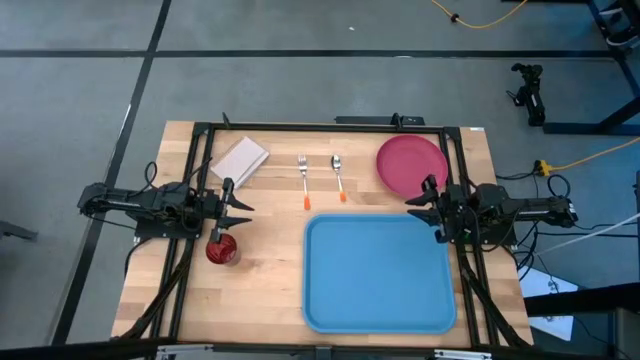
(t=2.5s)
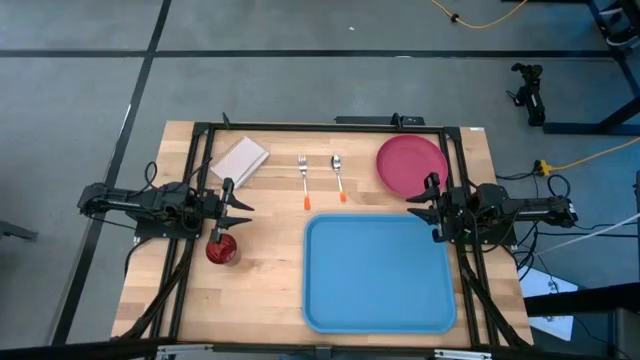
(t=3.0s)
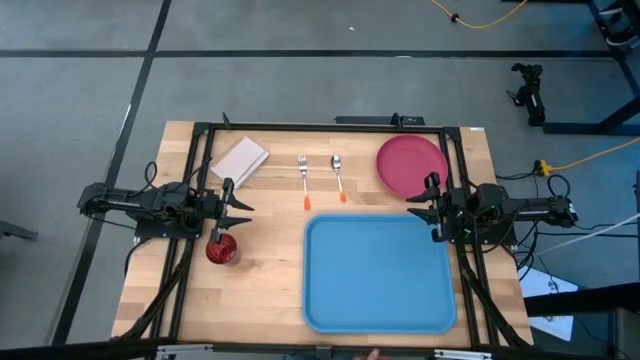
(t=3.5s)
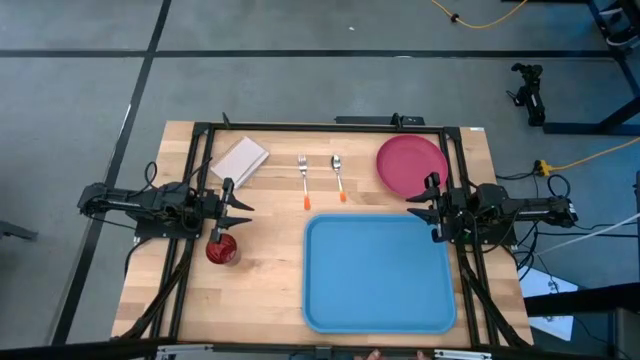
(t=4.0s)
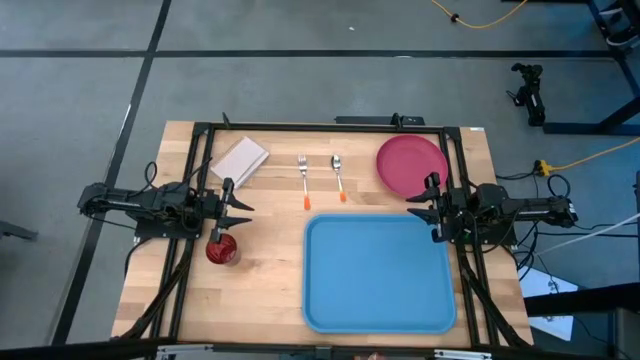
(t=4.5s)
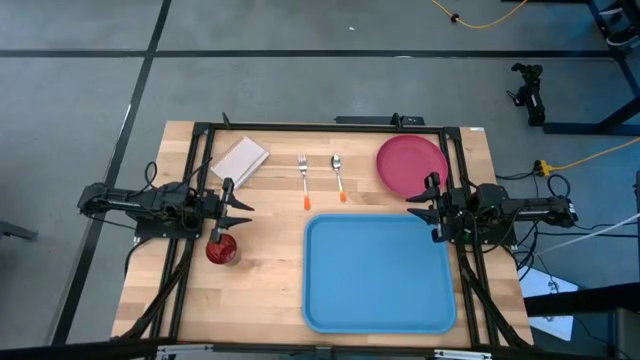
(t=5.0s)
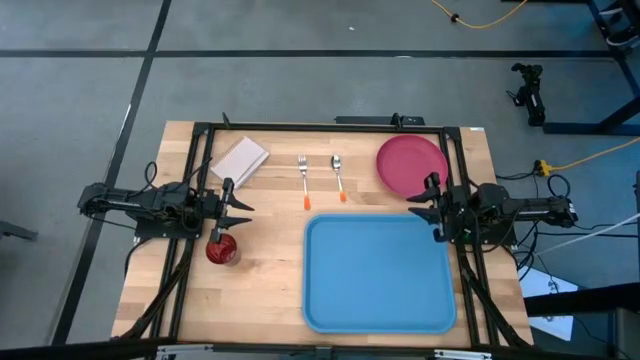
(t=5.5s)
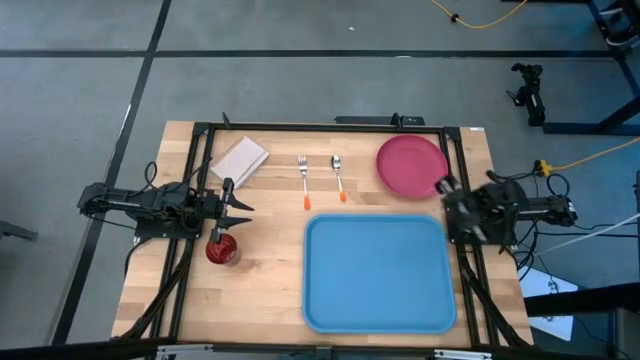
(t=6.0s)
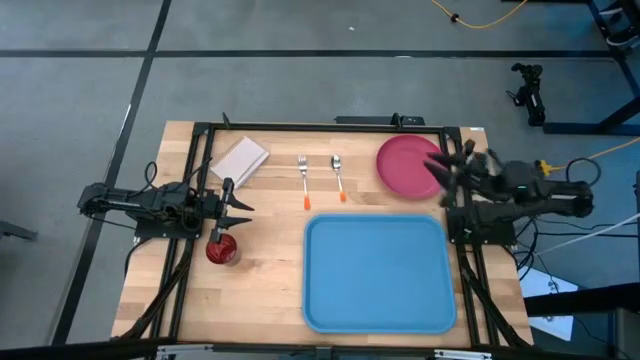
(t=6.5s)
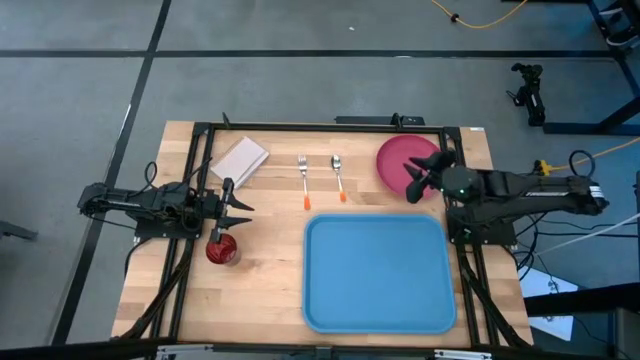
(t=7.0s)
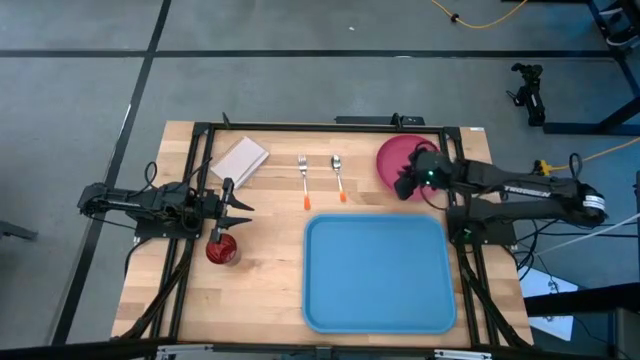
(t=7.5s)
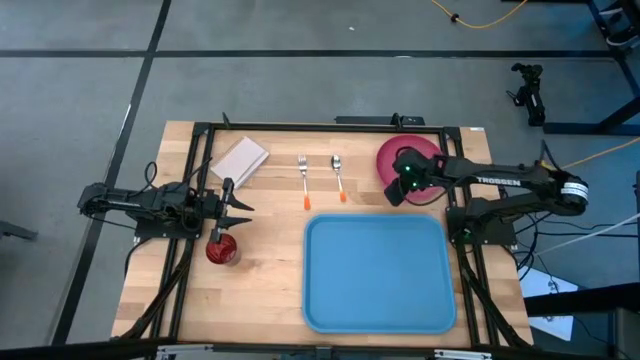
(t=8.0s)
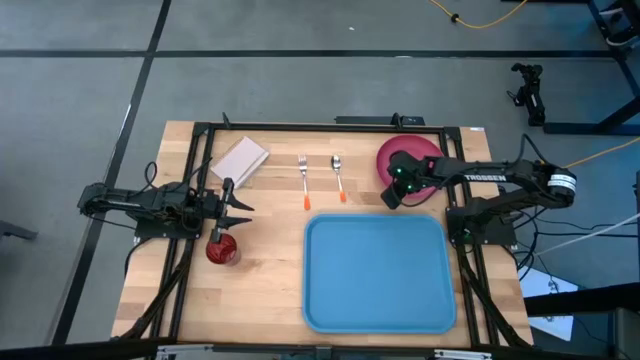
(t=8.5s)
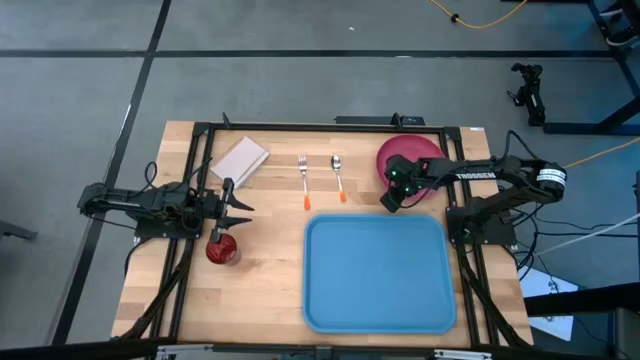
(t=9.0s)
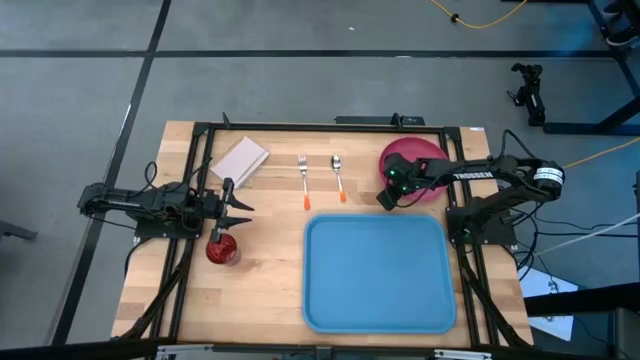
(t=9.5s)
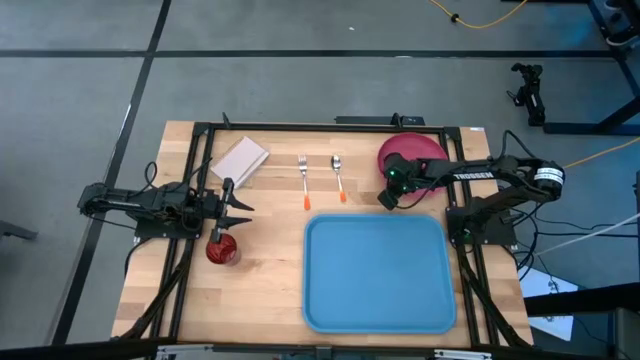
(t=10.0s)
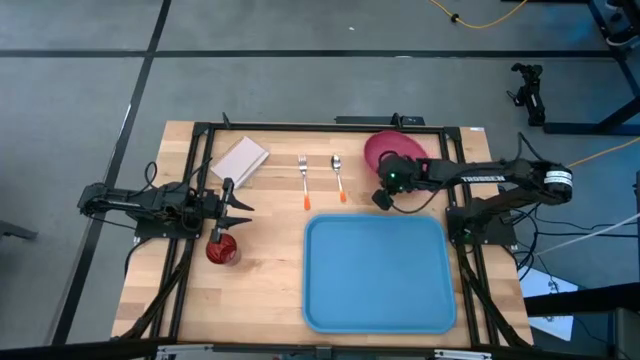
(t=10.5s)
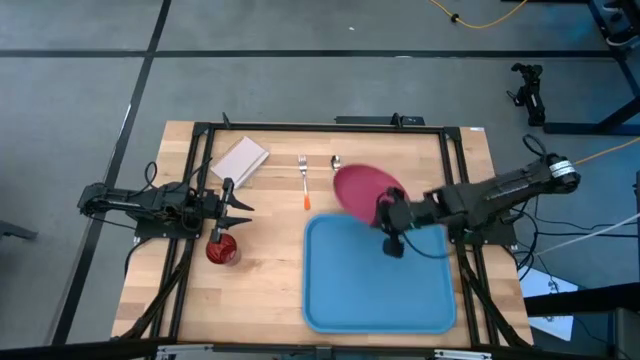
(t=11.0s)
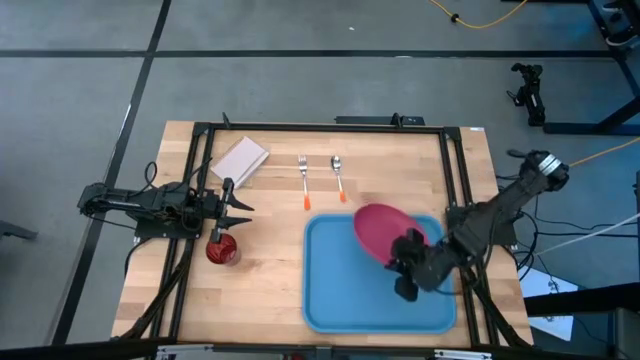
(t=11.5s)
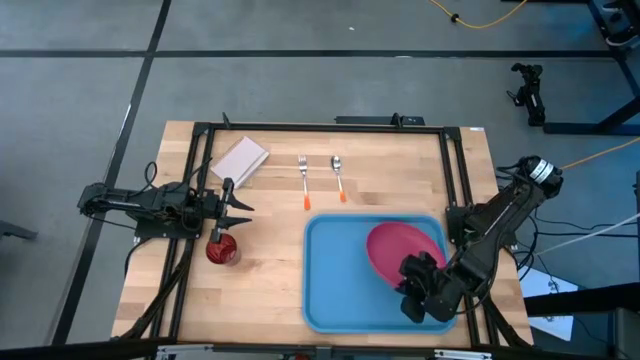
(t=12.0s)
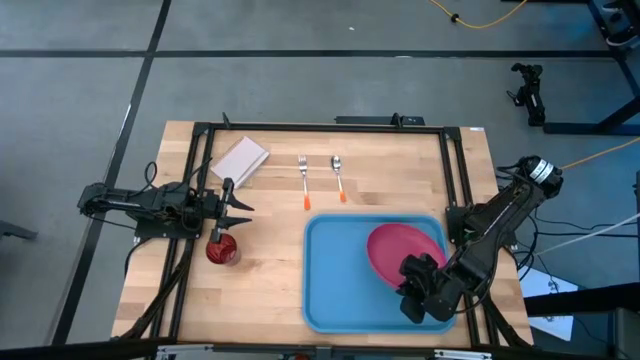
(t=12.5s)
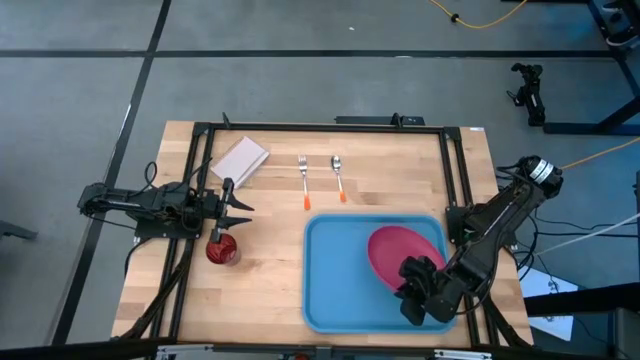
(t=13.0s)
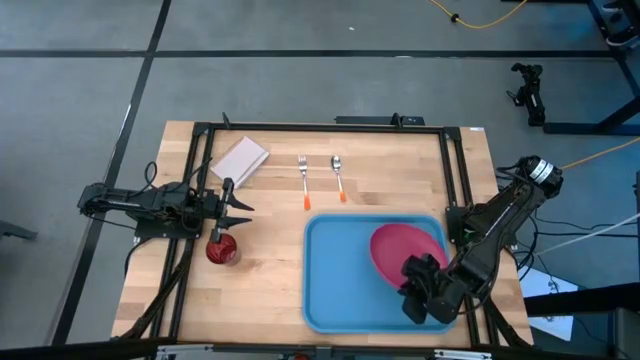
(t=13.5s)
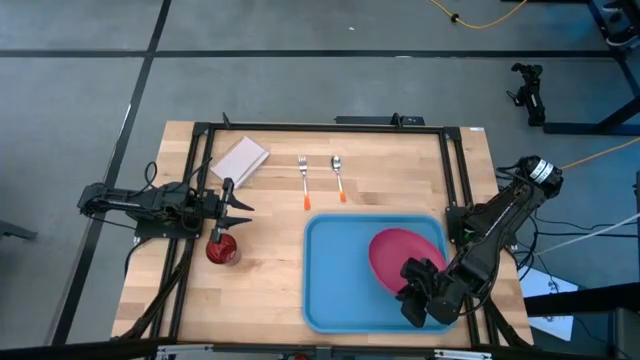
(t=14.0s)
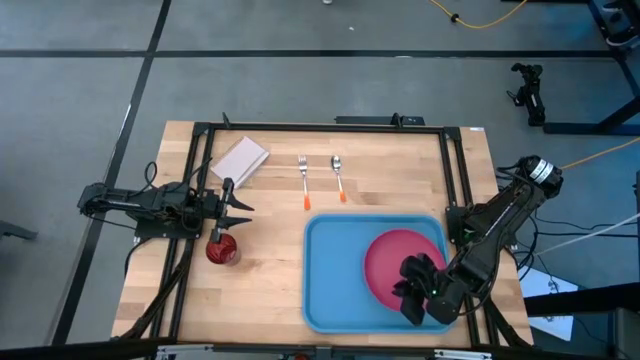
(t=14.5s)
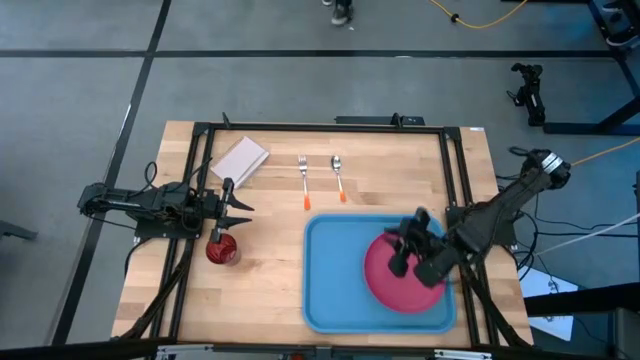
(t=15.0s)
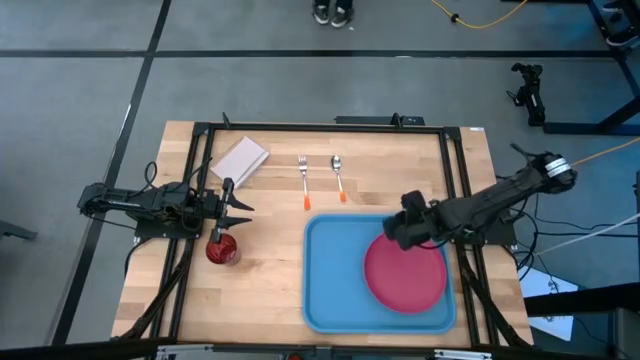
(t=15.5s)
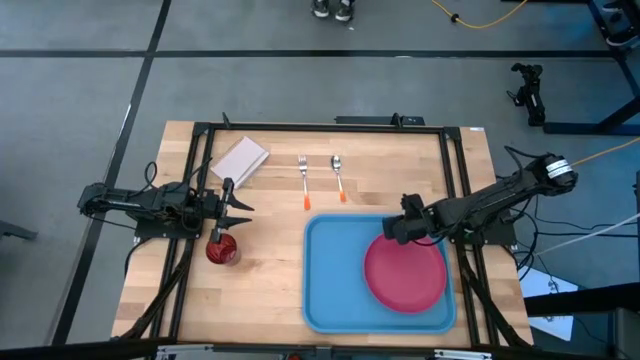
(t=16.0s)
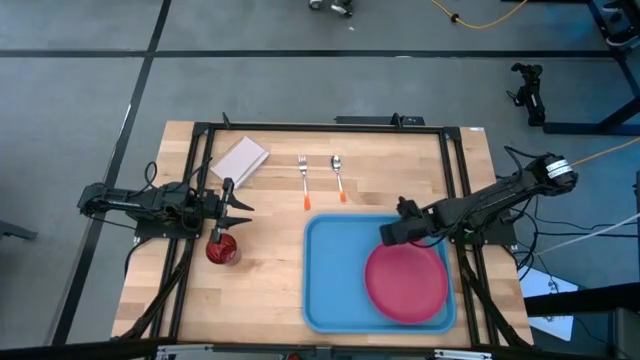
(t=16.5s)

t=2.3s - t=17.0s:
Task: Pick and place plate/cup/fork/spoon on tray
Put the pink plate on the blue tray

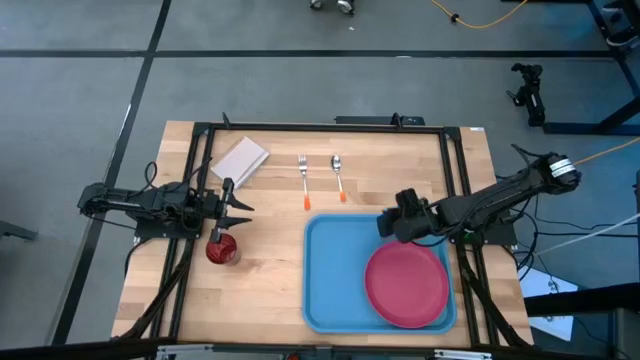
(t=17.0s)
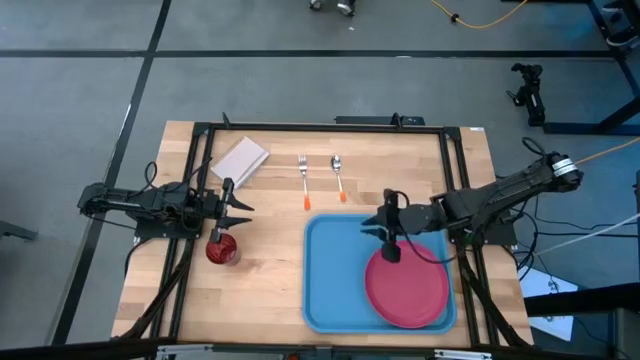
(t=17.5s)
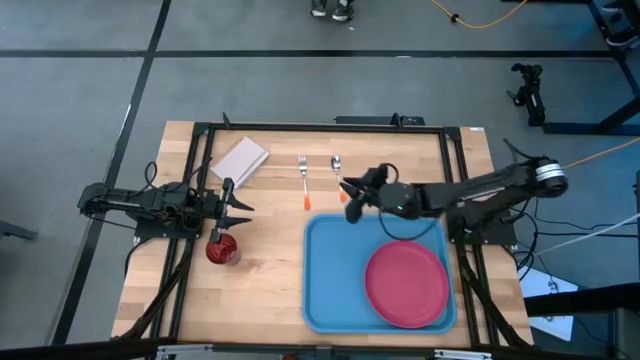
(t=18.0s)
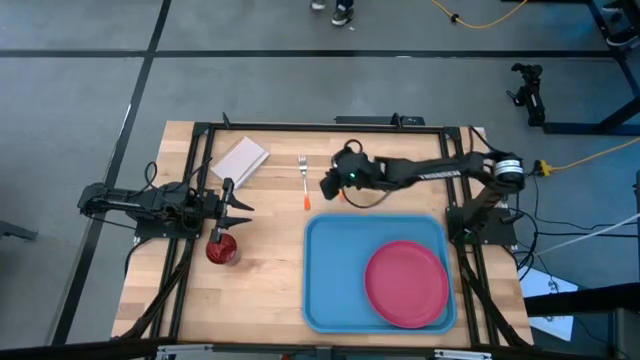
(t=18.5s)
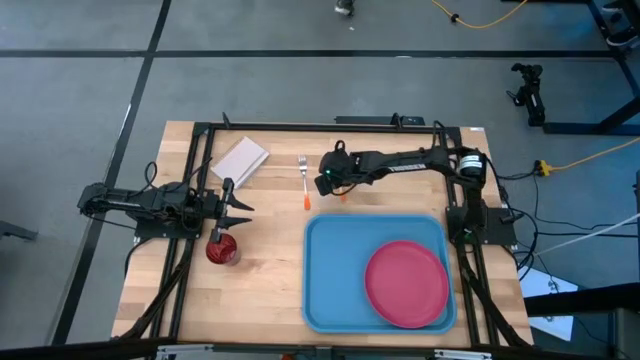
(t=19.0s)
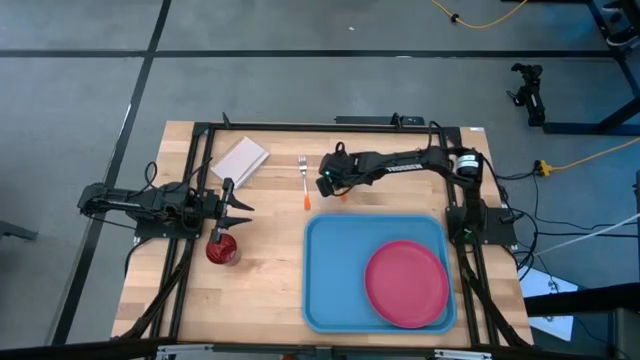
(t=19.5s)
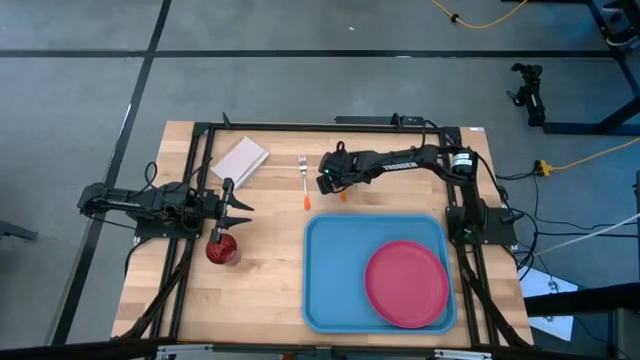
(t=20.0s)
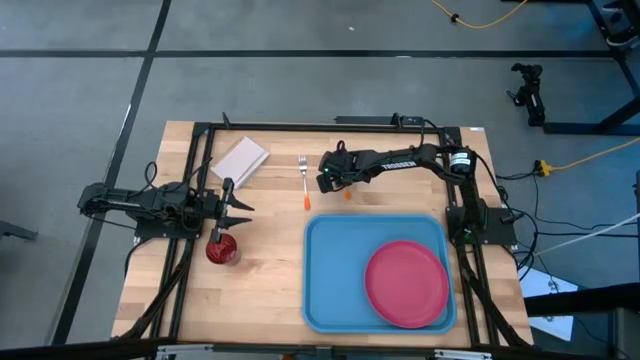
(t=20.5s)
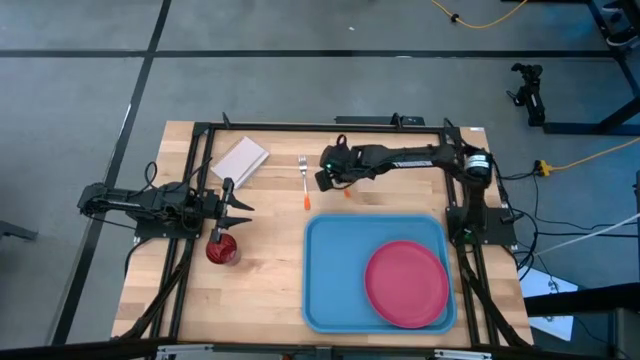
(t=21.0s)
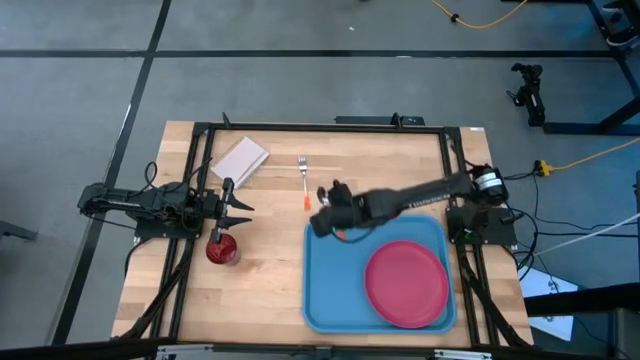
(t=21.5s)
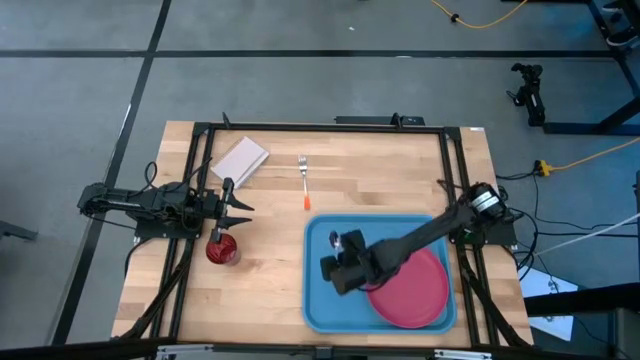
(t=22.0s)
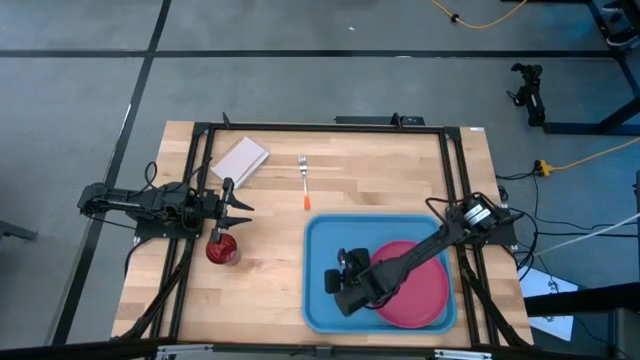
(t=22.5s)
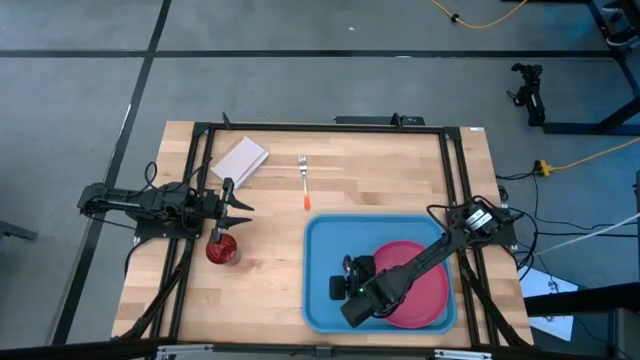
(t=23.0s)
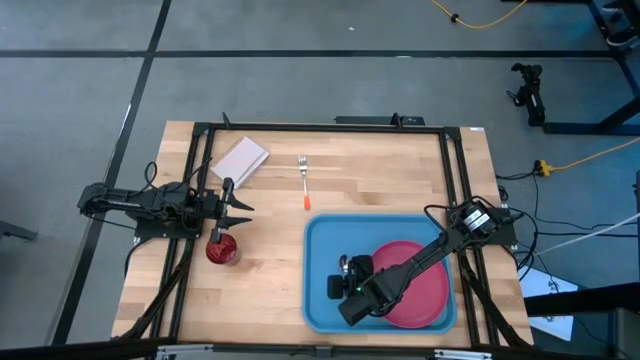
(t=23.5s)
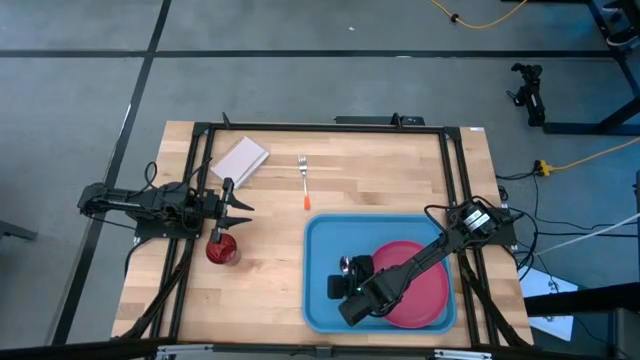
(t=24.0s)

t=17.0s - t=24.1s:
Put the orange spoon on the blue tray
